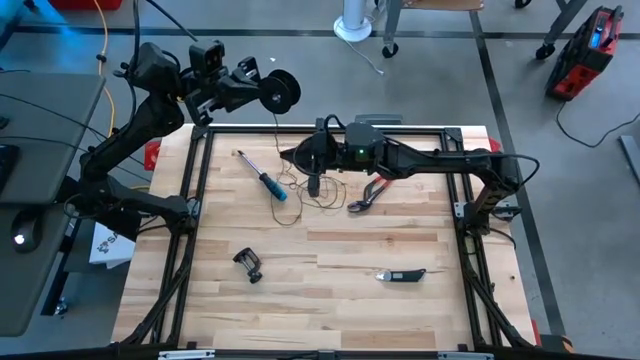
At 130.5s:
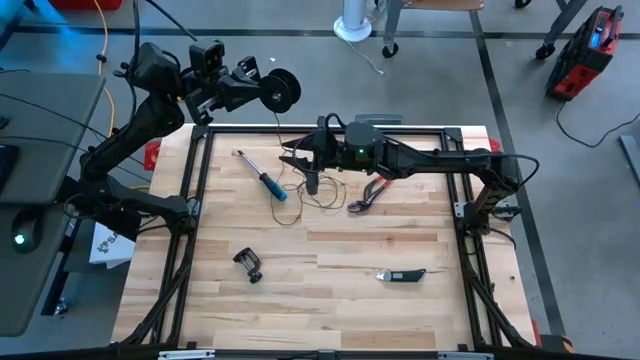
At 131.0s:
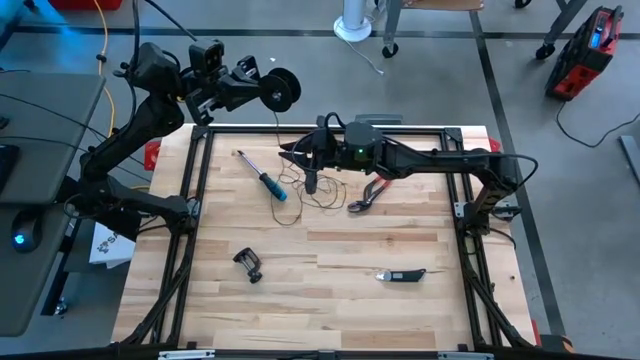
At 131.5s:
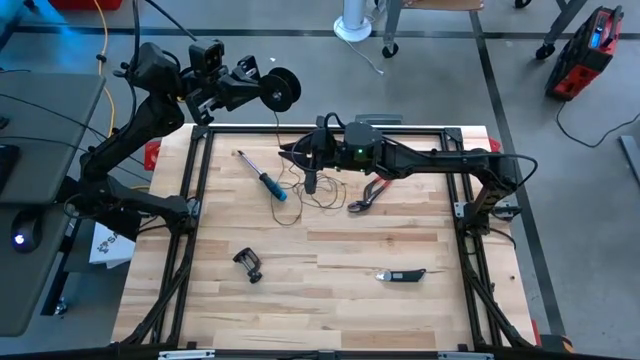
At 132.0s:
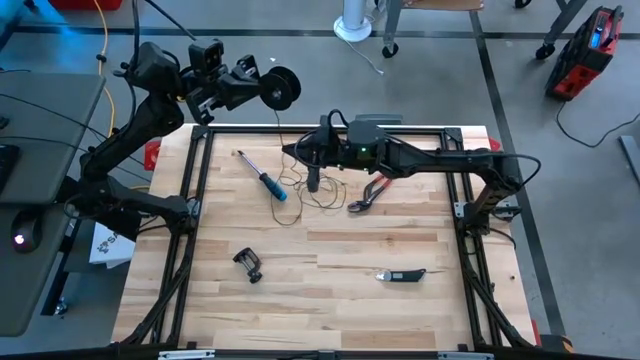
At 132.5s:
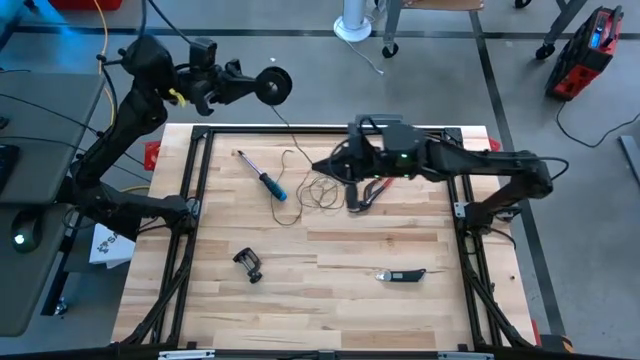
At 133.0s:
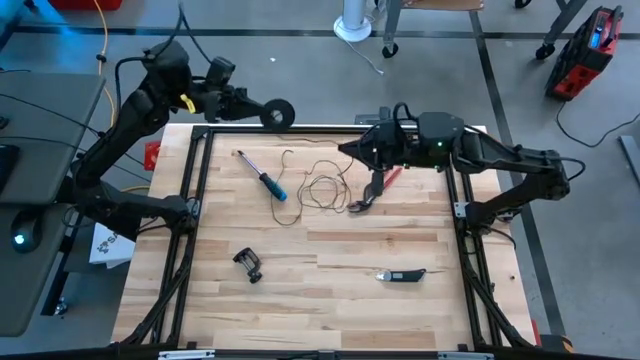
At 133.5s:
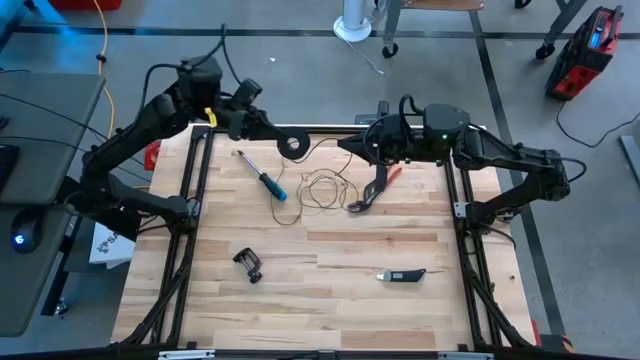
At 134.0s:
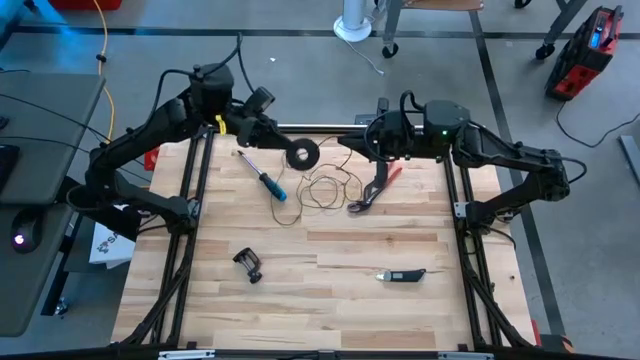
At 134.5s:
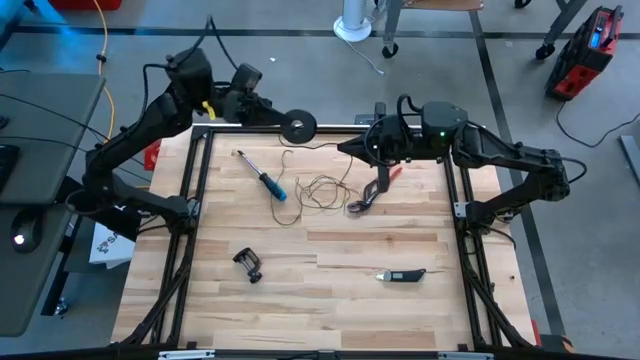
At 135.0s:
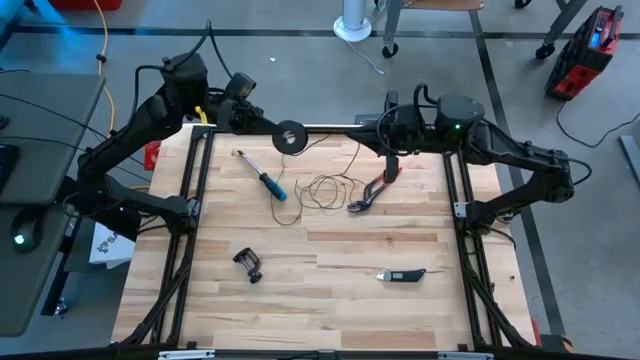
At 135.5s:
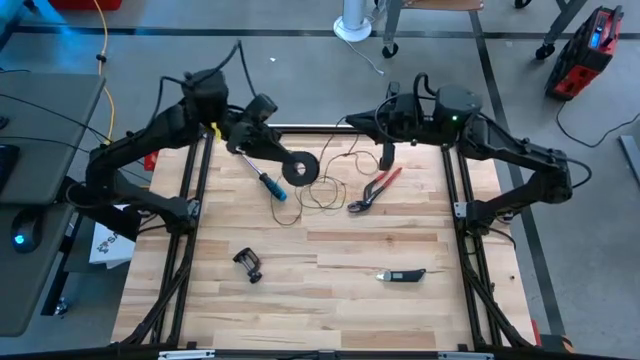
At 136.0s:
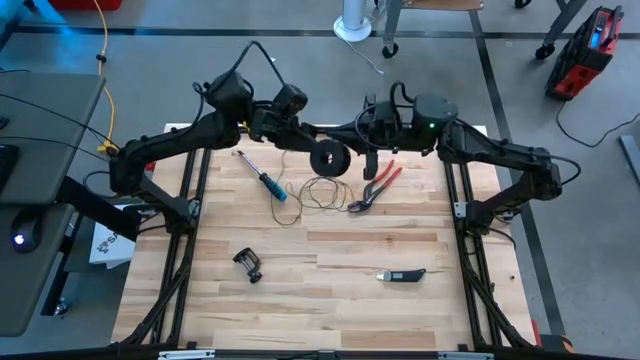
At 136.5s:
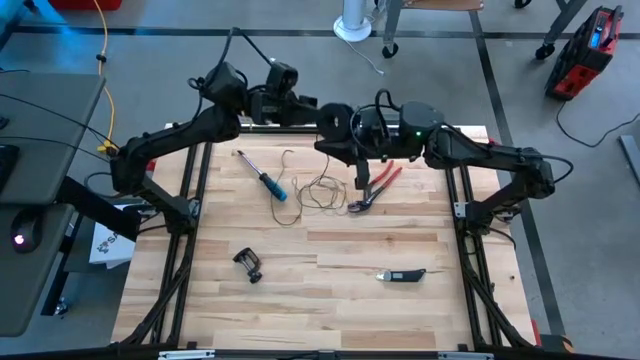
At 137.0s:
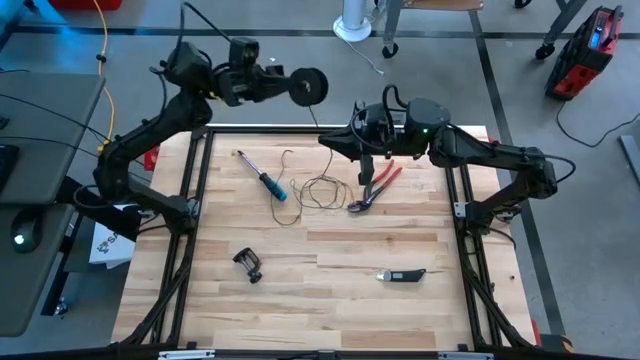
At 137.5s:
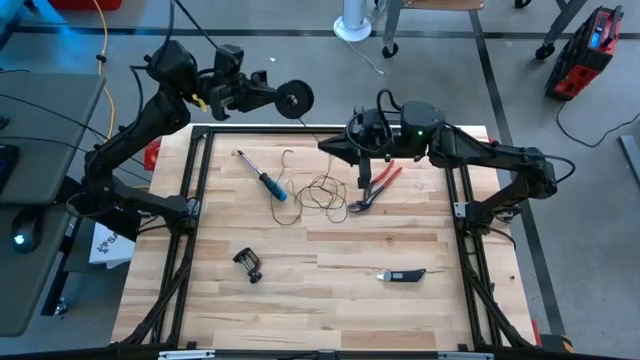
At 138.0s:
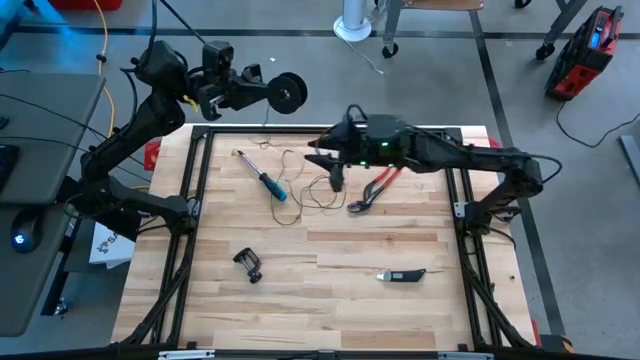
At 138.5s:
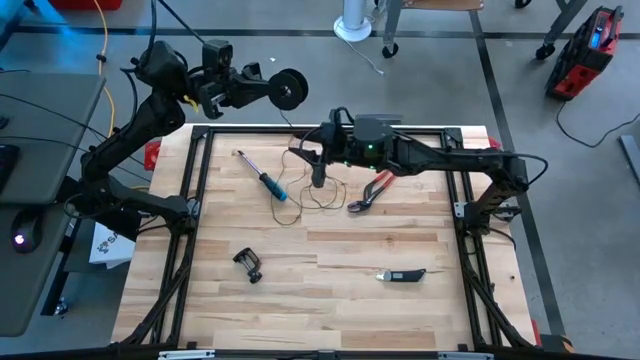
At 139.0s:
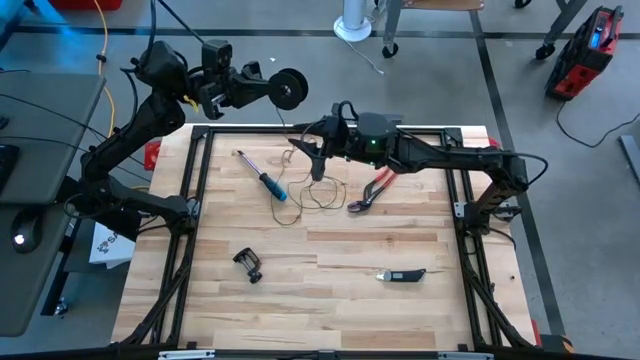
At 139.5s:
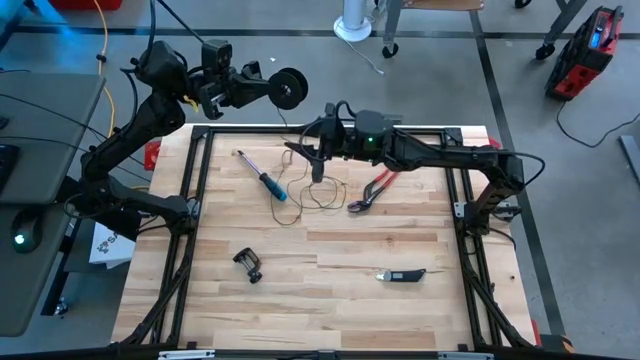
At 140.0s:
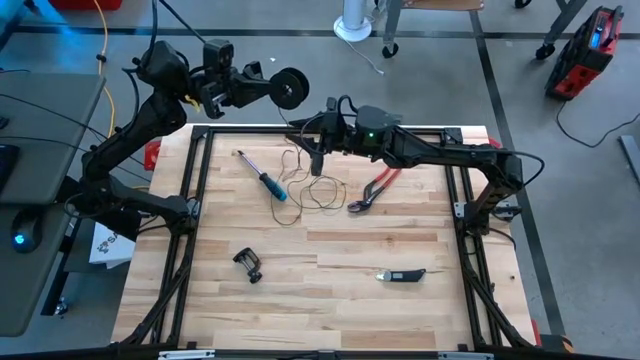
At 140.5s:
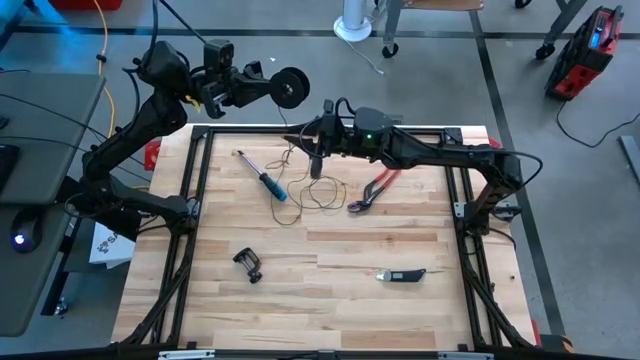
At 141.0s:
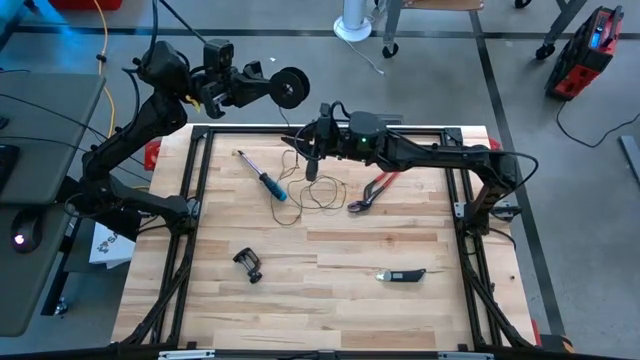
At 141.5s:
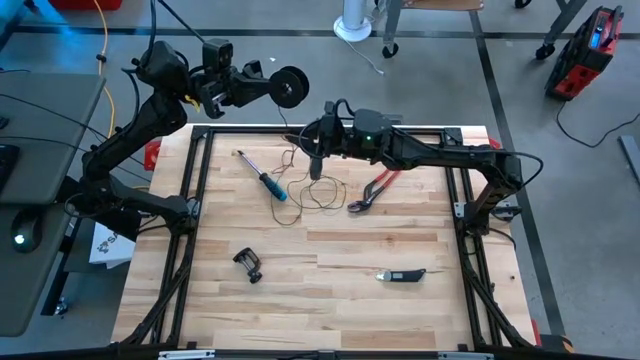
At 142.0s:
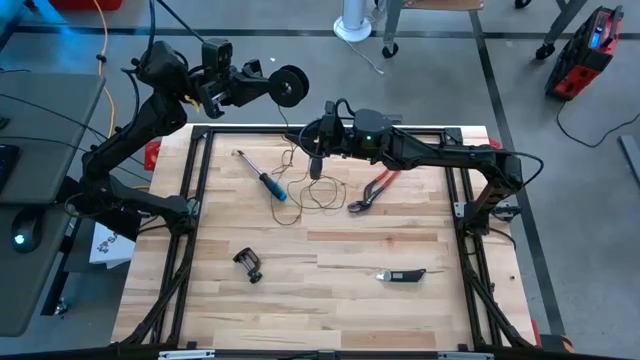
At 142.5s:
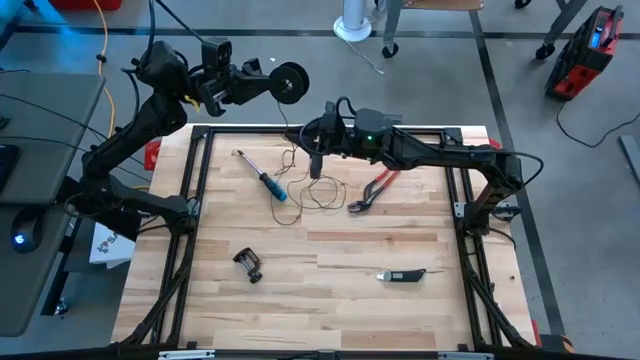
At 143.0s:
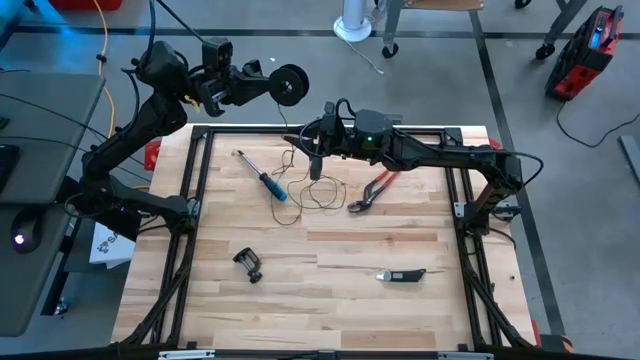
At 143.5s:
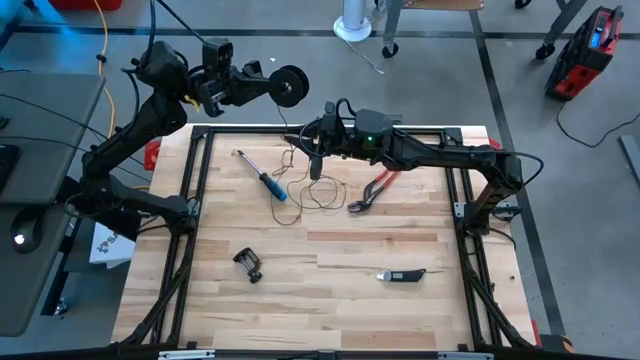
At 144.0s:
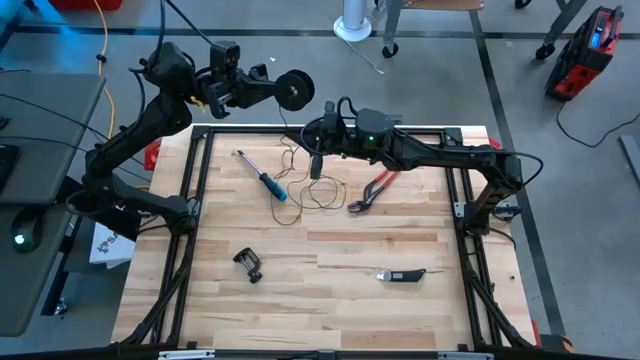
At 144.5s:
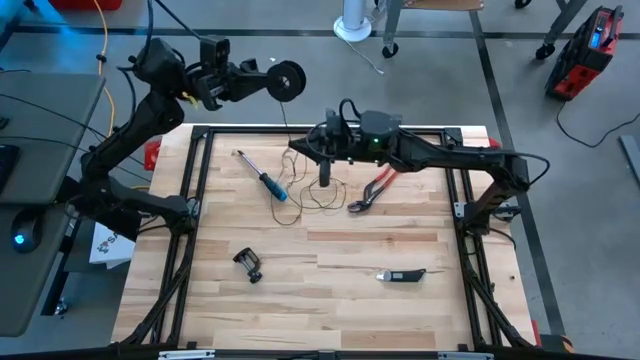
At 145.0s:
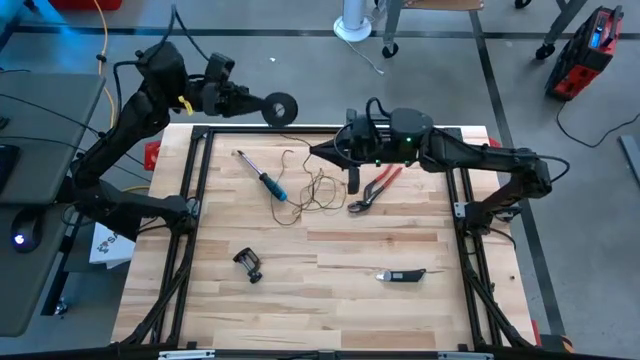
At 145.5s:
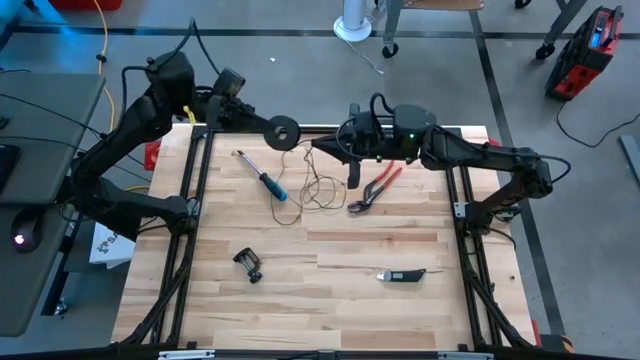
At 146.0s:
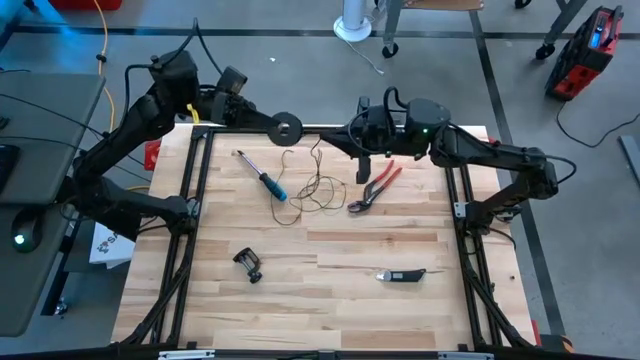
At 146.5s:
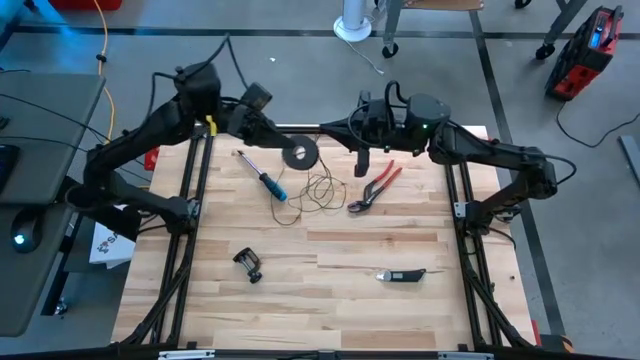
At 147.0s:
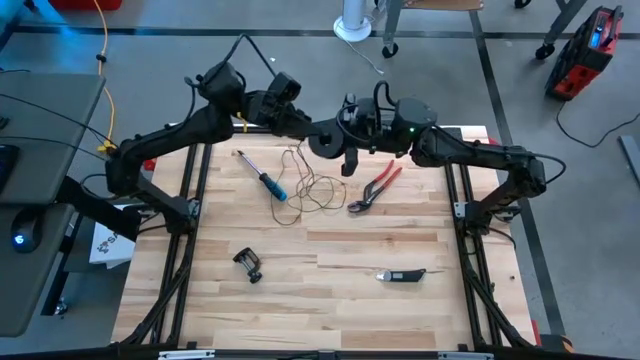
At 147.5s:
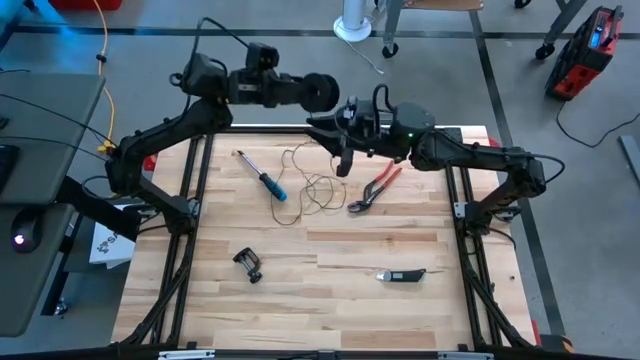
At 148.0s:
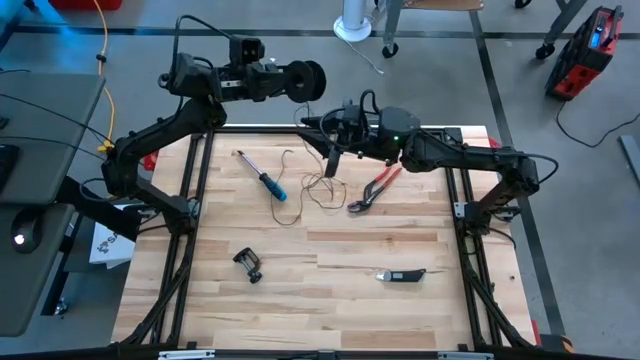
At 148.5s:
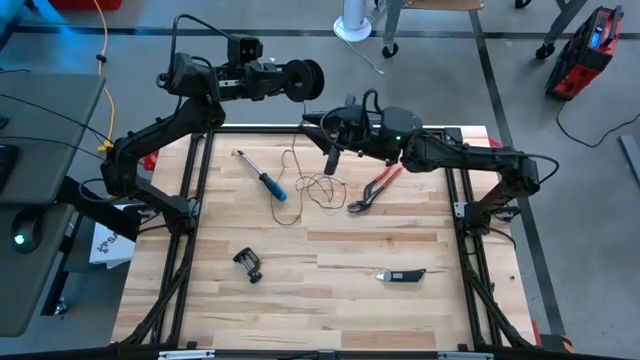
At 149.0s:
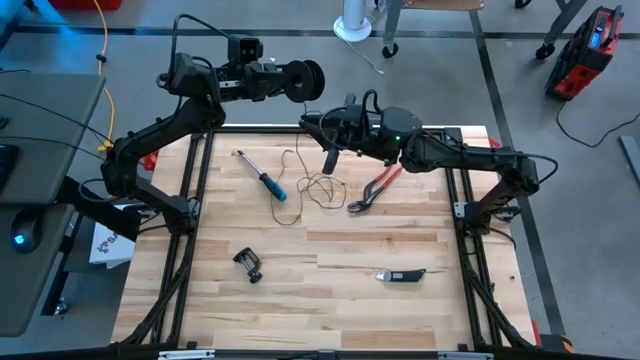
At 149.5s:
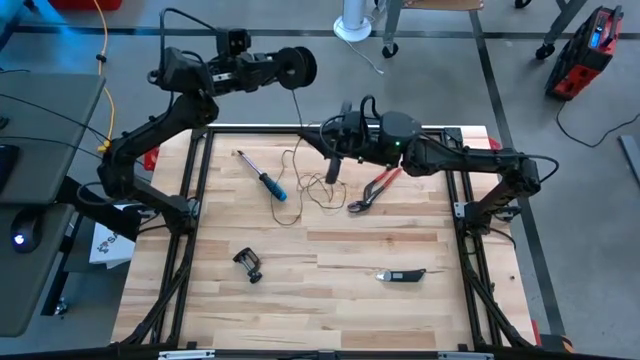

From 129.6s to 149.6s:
Task: Coil cords
Coil the black wire onto the black spool
